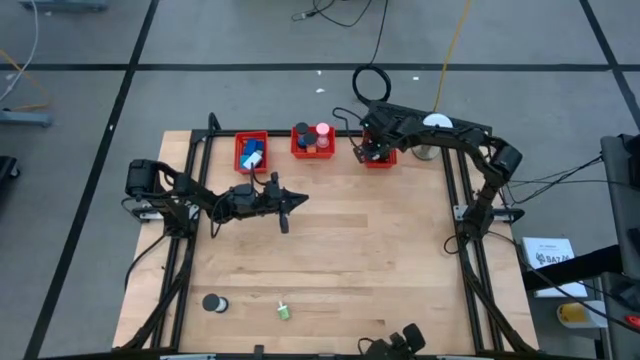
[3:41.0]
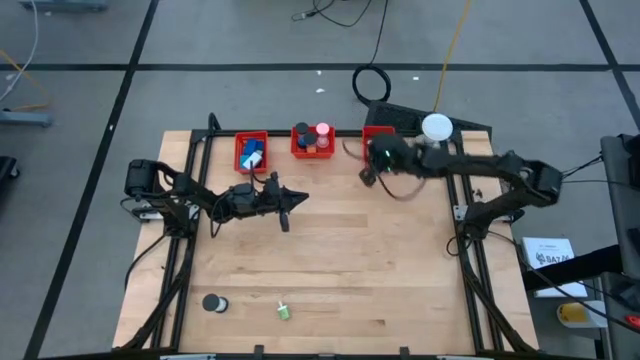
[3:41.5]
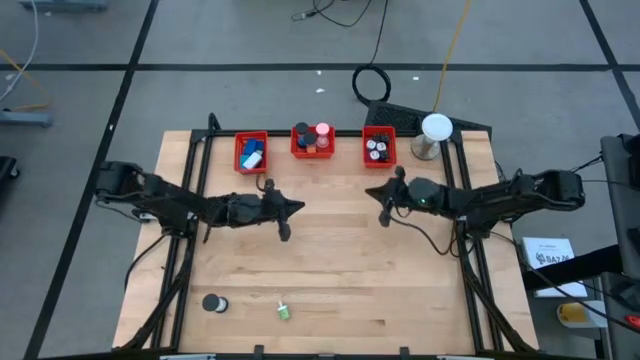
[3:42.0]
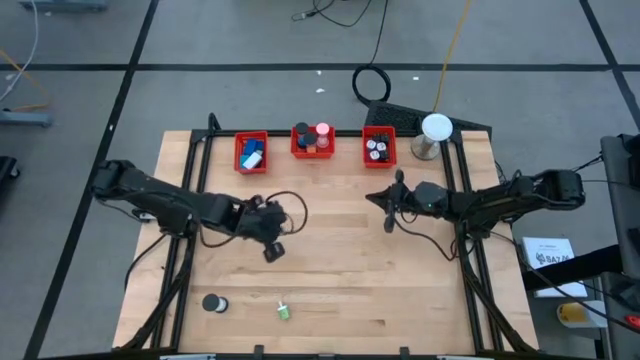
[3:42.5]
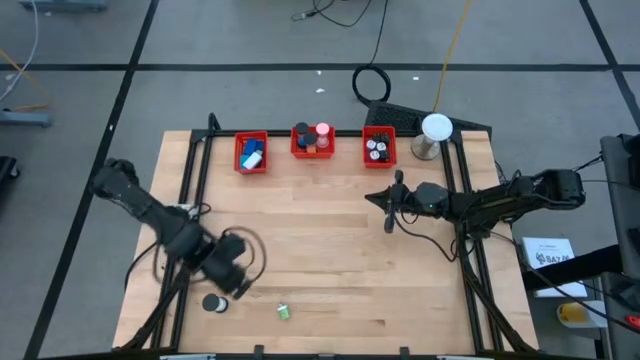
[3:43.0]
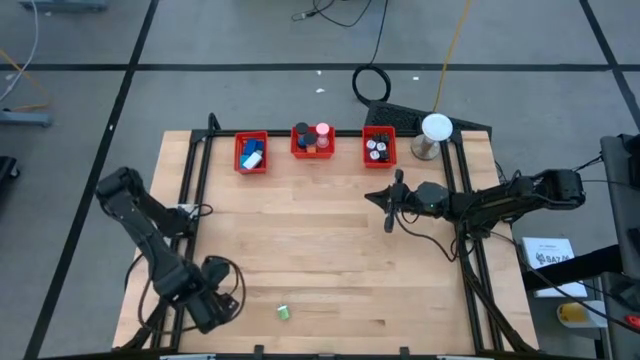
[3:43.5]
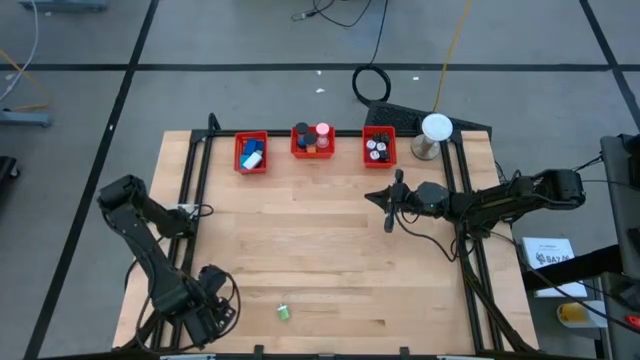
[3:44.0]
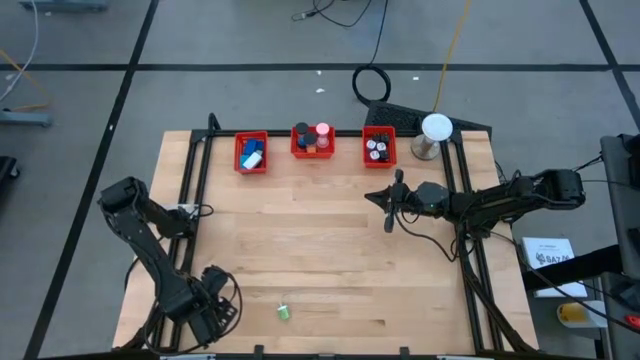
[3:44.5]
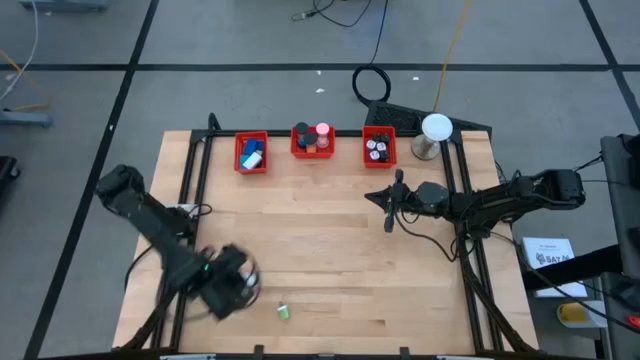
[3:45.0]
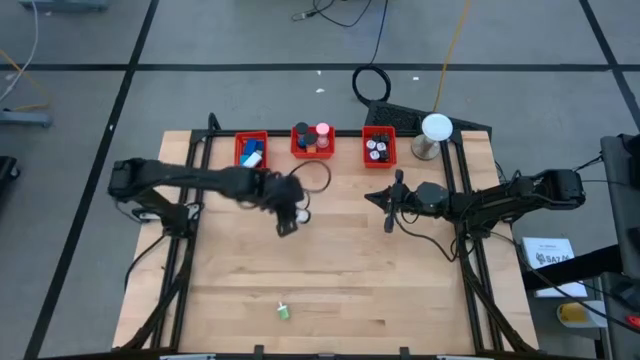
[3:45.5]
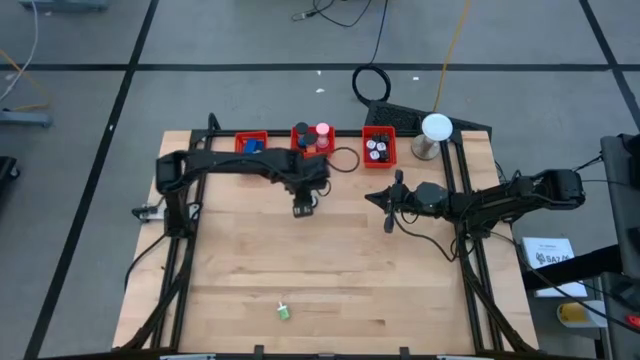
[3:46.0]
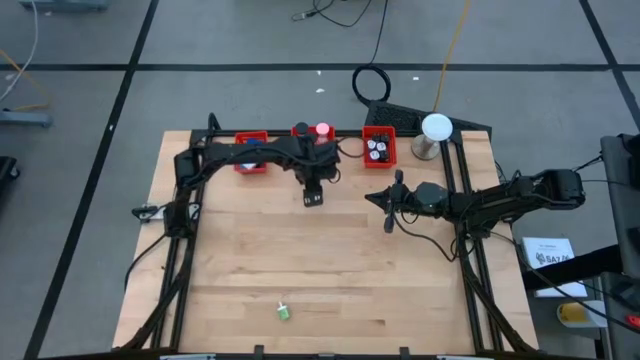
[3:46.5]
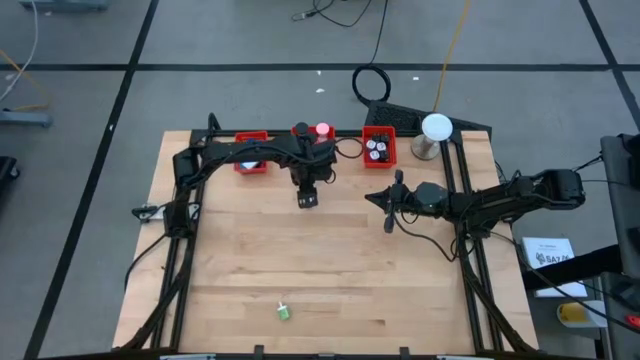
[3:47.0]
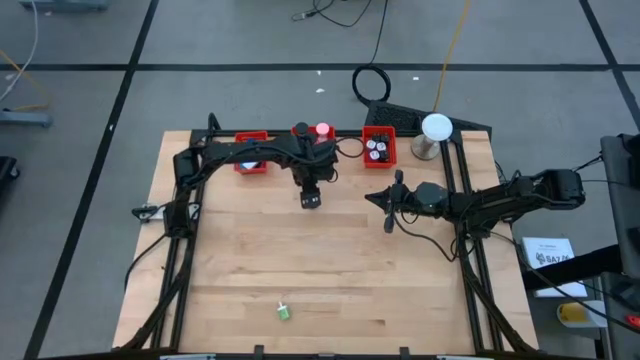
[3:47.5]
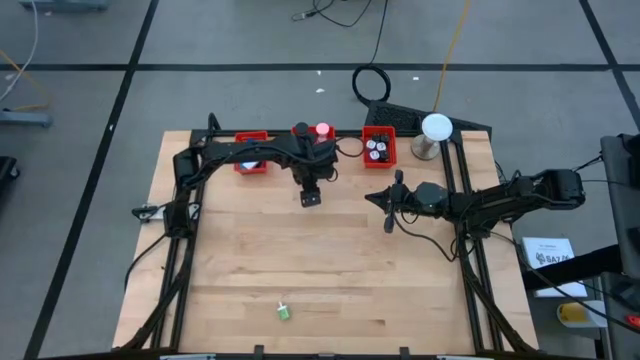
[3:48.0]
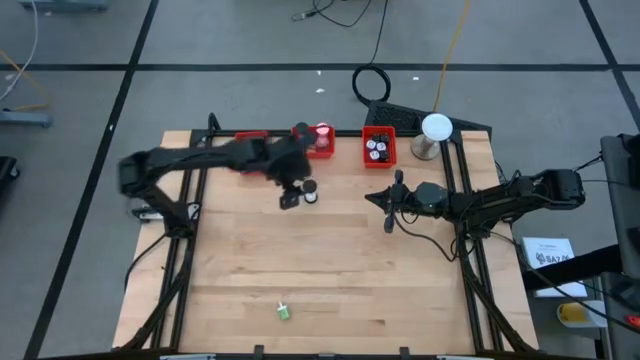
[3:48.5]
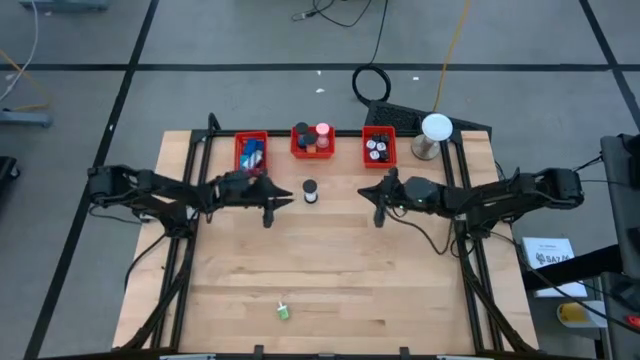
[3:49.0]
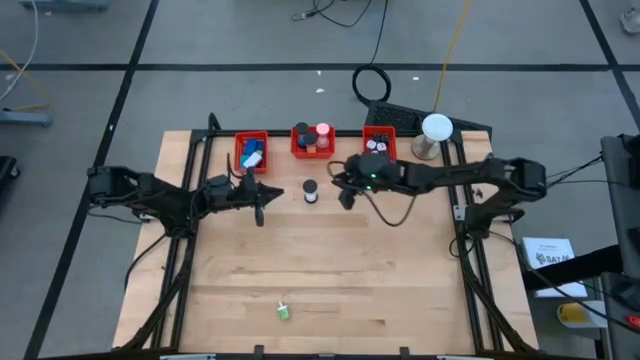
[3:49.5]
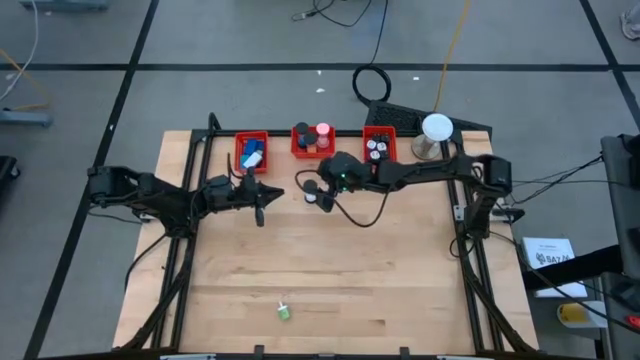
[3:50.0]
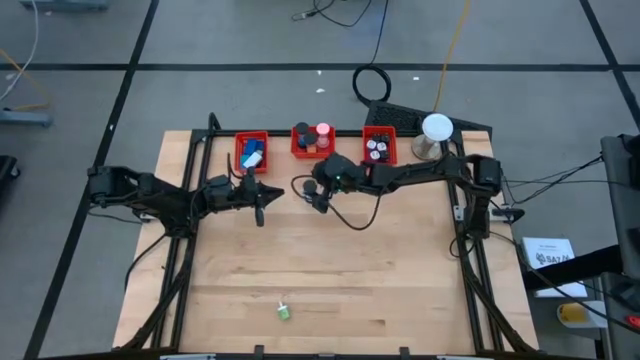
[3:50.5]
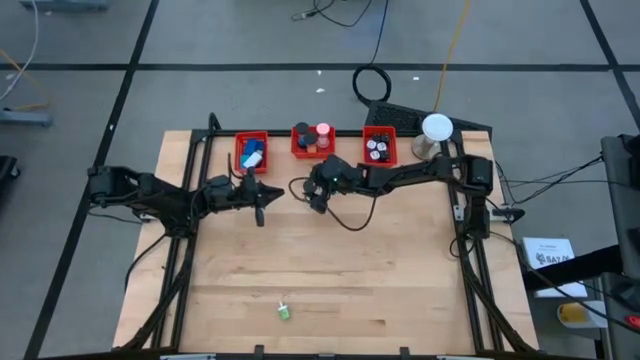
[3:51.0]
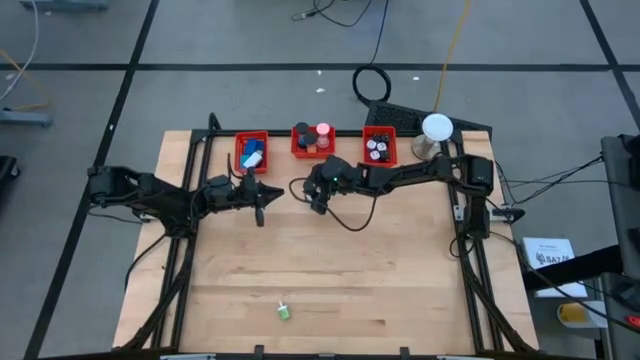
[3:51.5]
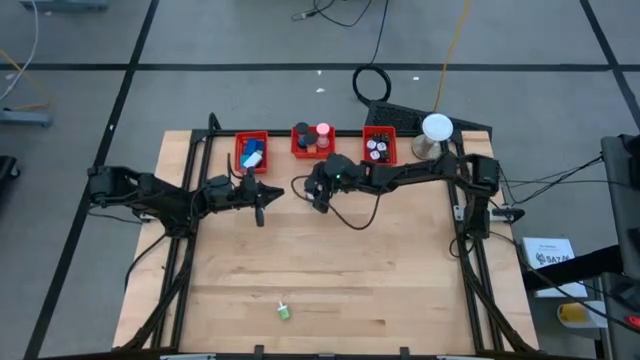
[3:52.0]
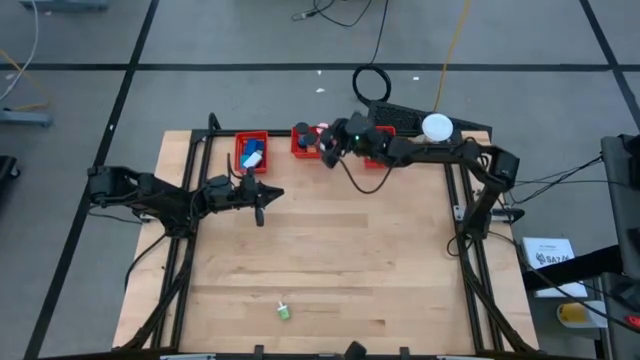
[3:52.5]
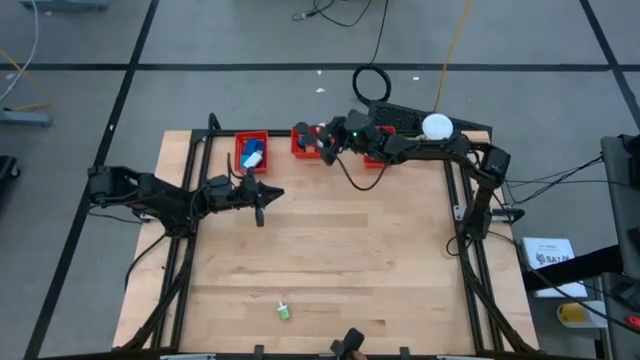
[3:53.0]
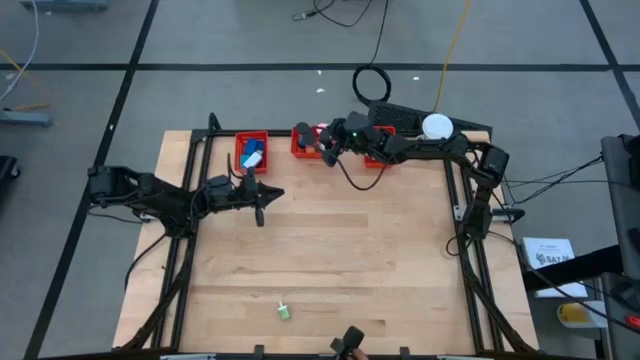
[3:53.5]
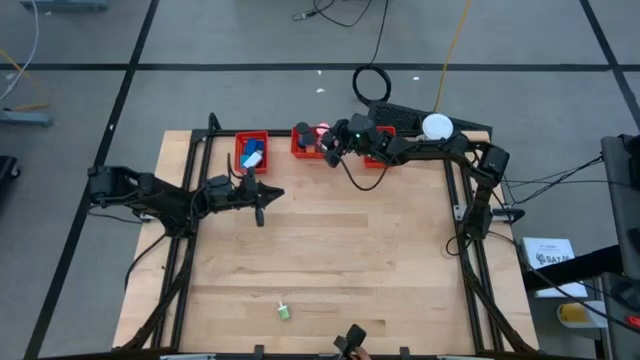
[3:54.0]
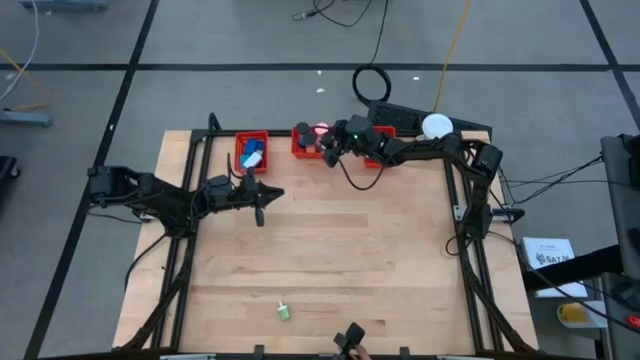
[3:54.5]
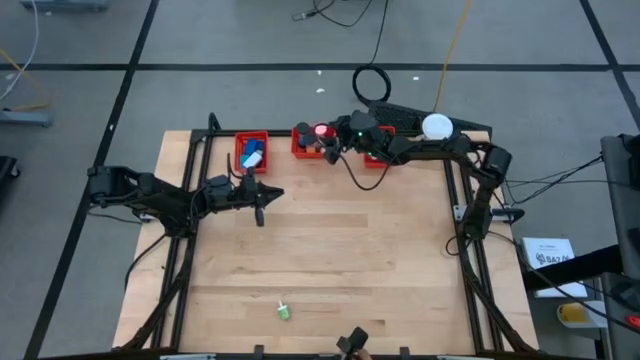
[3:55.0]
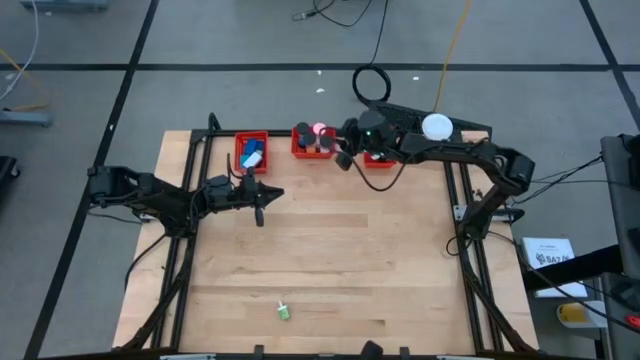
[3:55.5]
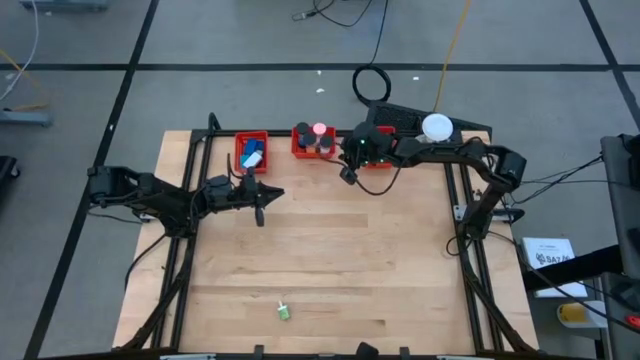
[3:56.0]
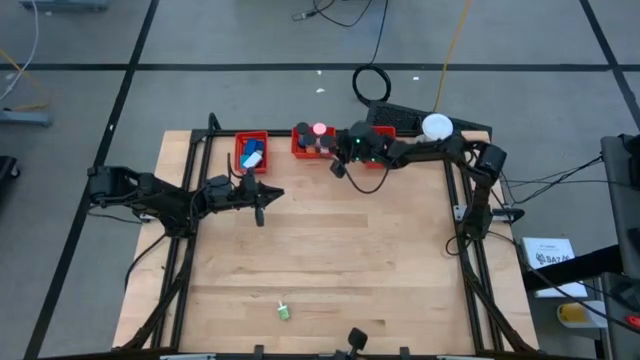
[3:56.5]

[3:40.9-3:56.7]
Task: Pick & Place Office items
Put the white hourglass into the middle orange basket

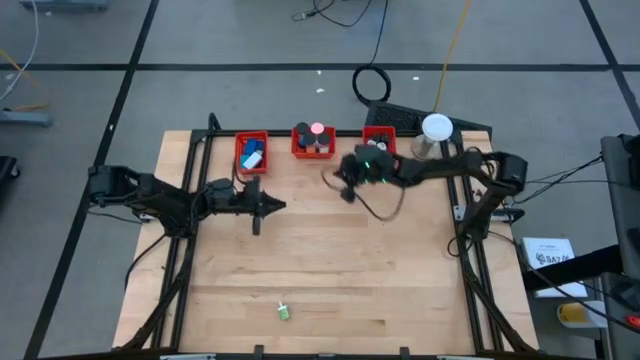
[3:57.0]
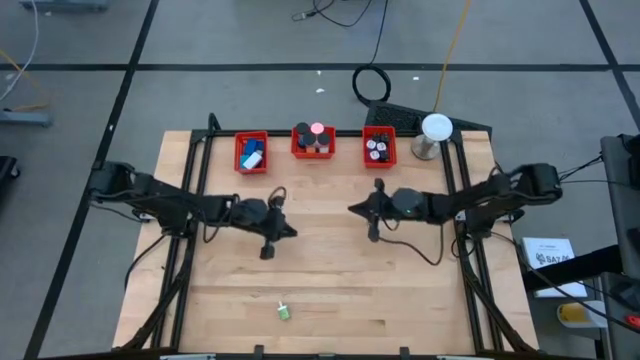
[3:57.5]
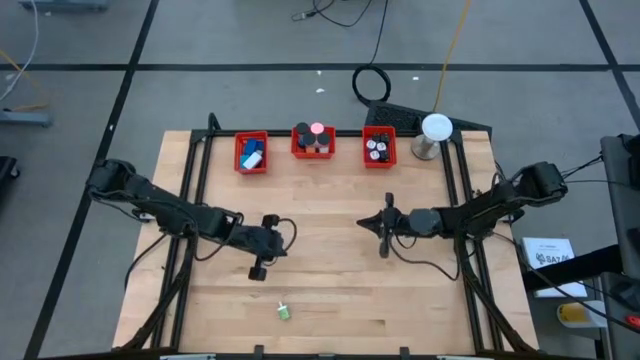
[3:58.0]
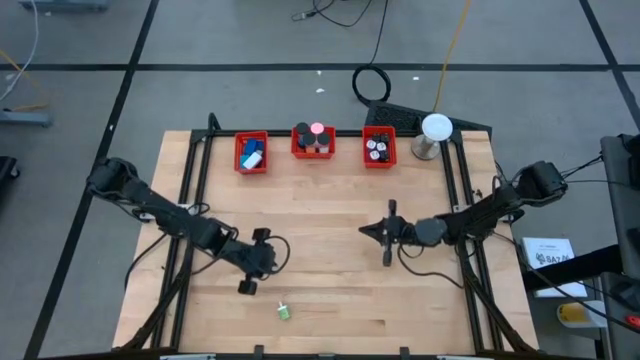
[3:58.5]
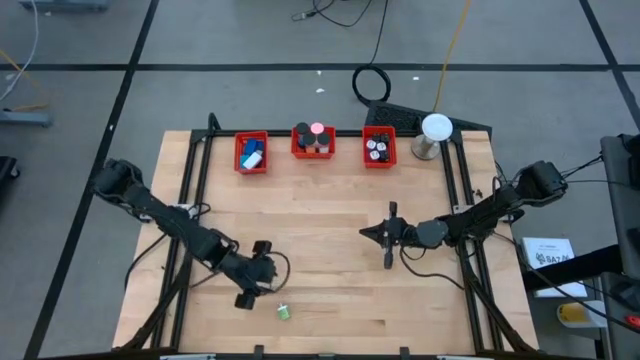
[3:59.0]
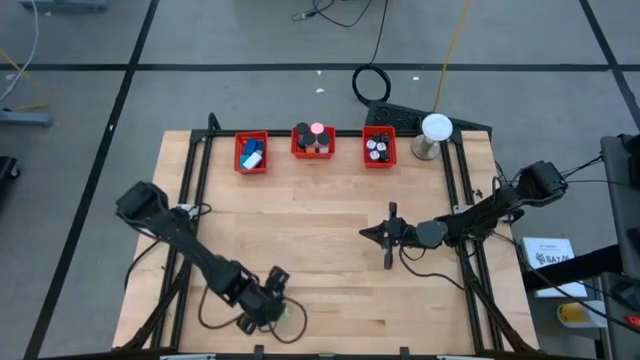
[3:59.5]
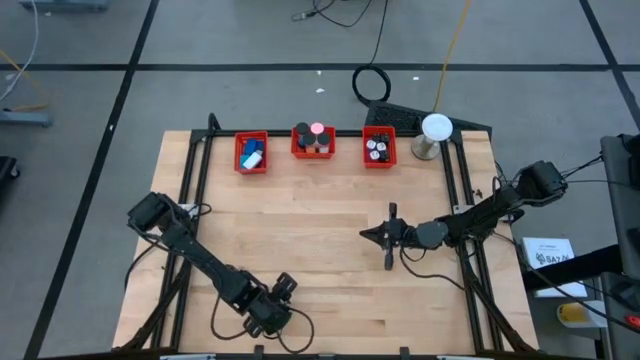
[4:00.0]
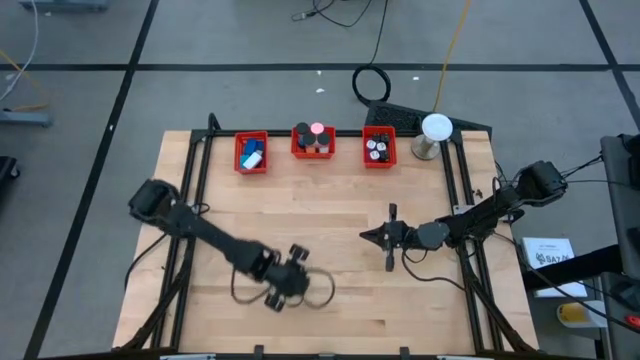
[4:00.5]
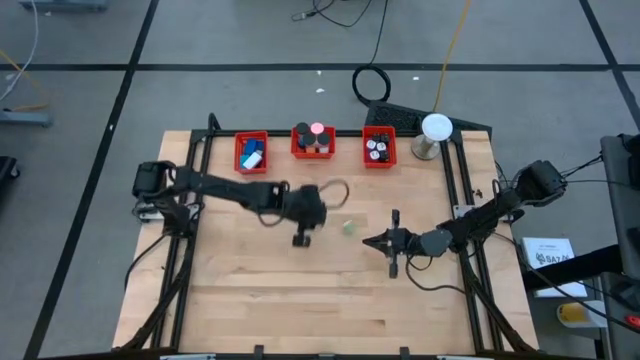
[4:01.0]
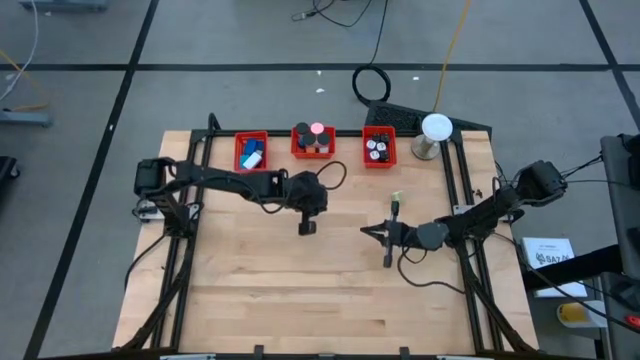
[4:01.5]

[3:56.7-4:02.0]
Put the green charger adapter into the right orange basket
